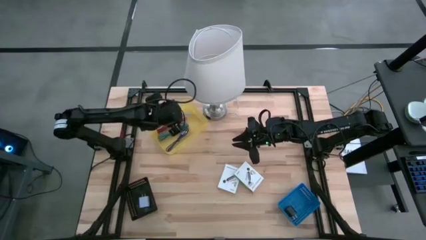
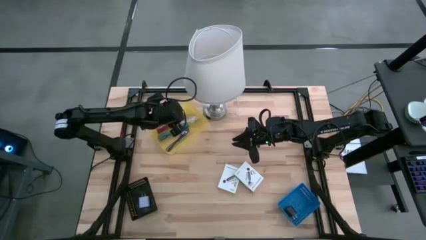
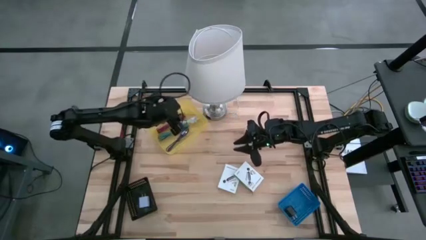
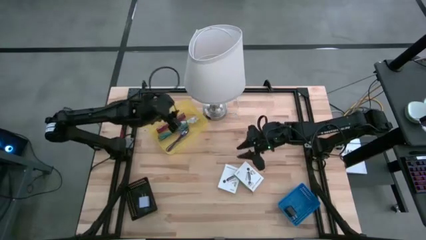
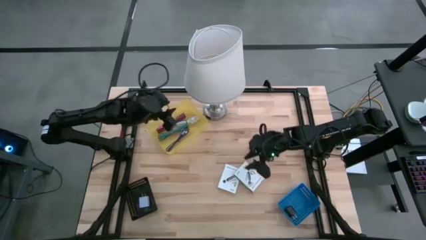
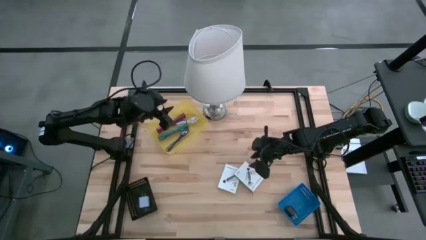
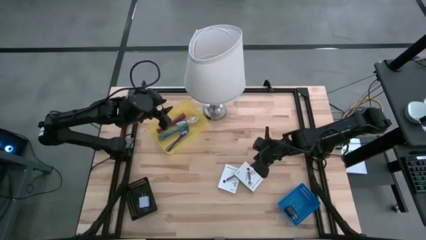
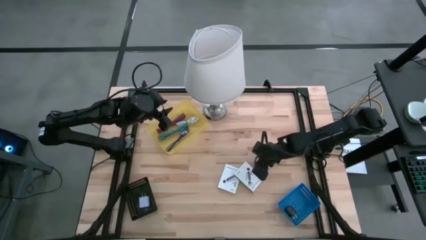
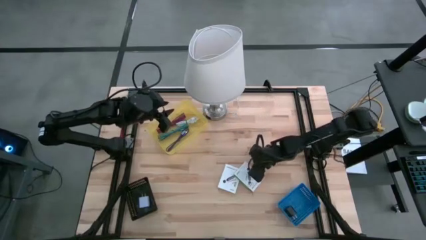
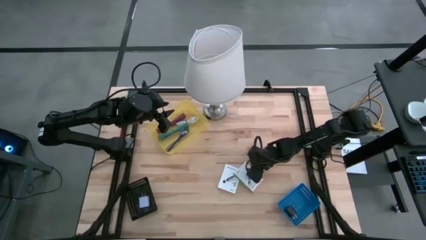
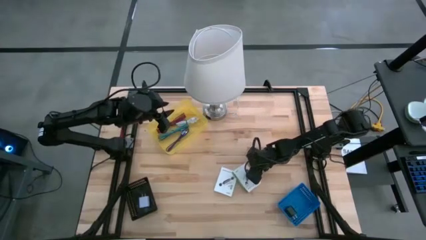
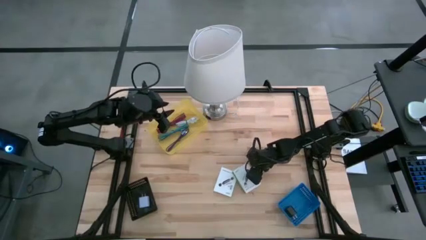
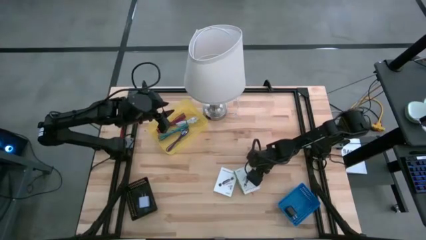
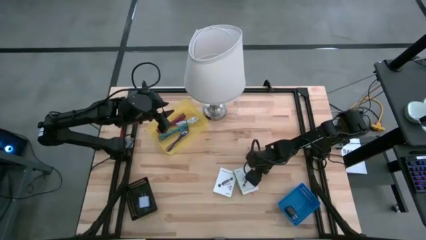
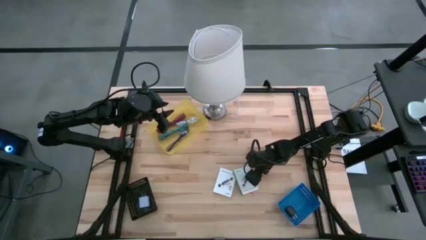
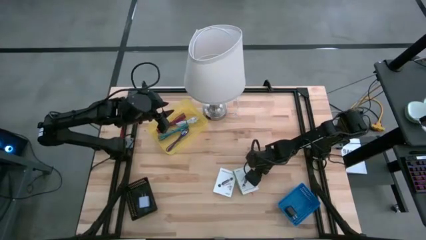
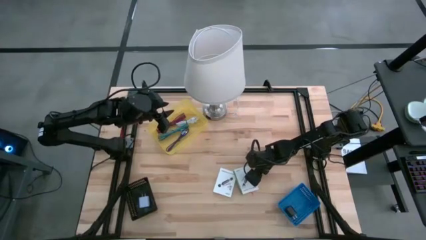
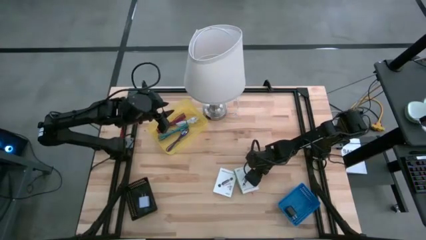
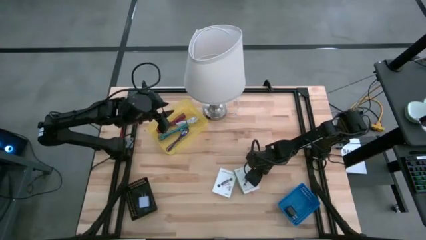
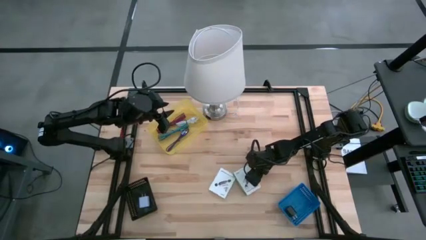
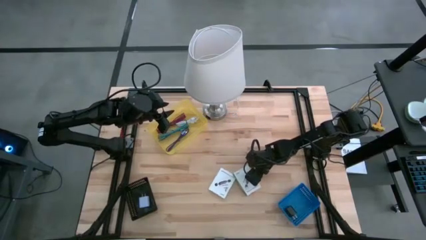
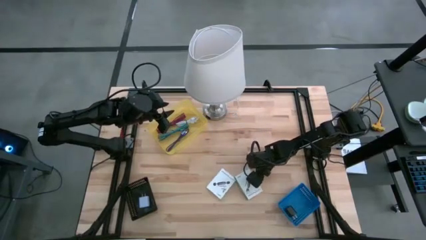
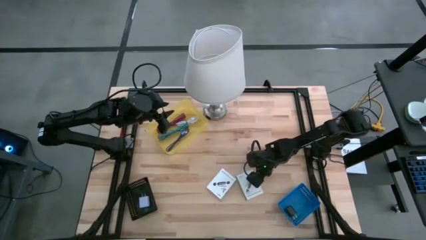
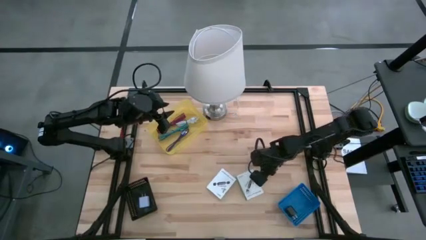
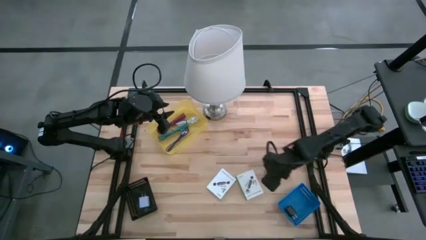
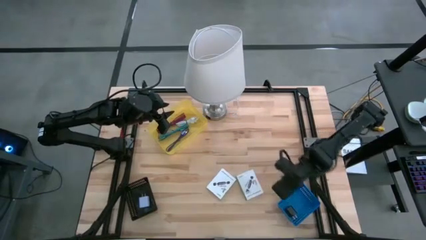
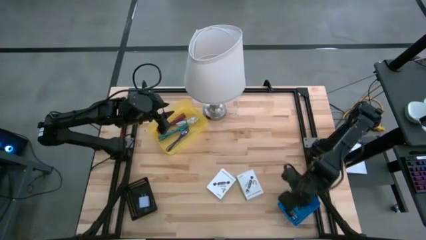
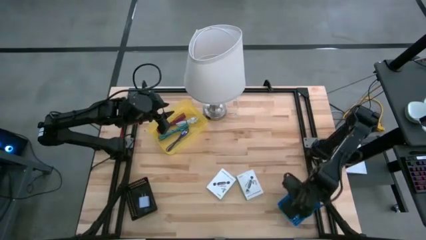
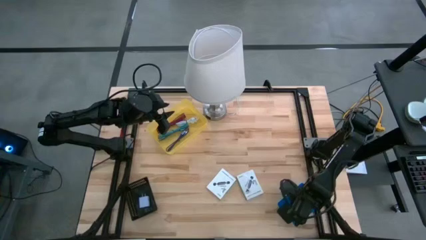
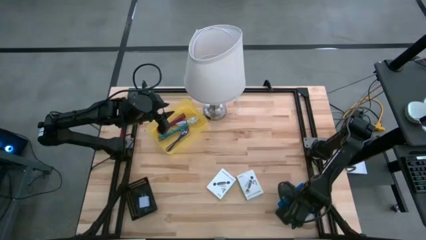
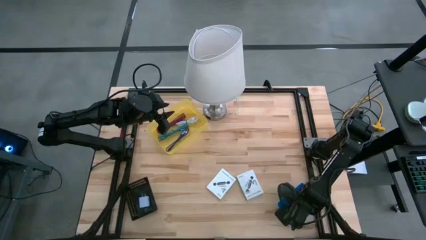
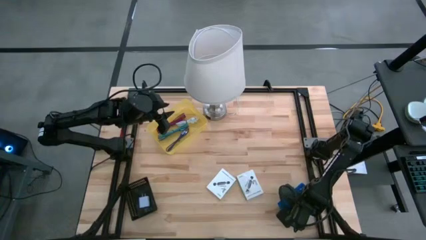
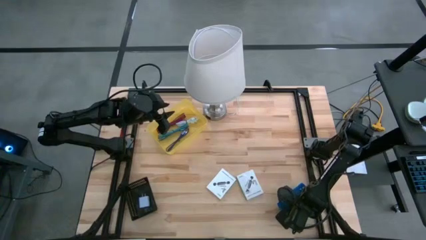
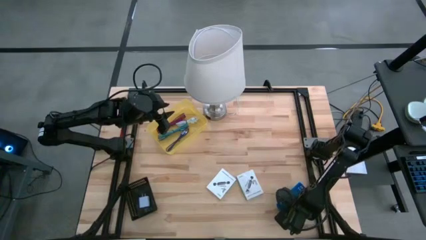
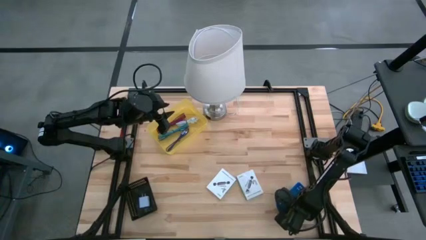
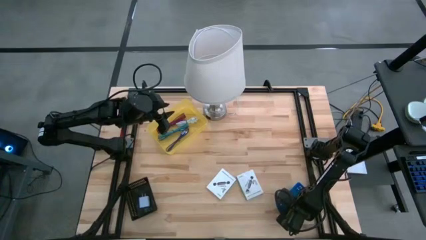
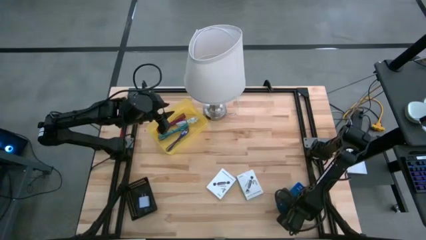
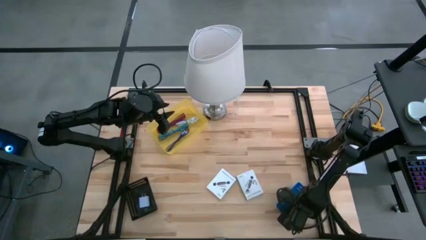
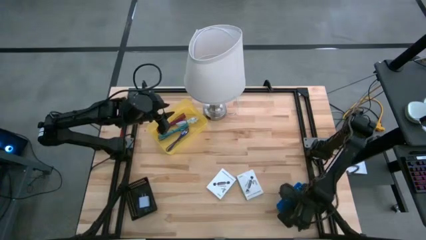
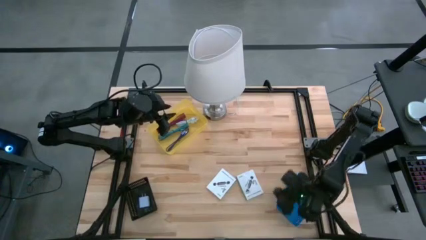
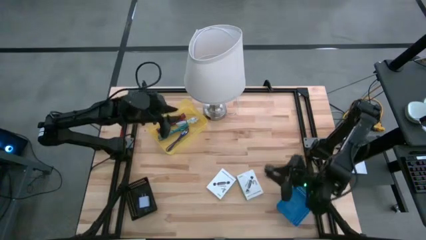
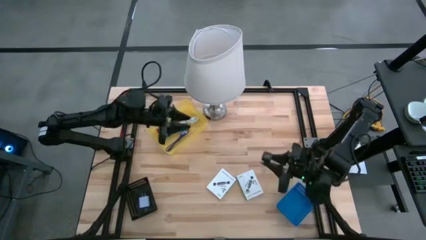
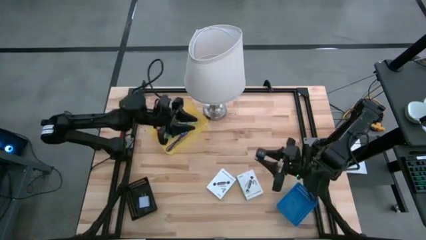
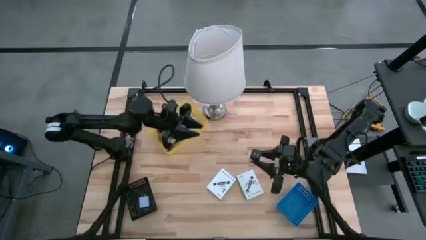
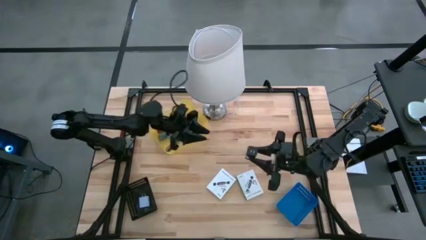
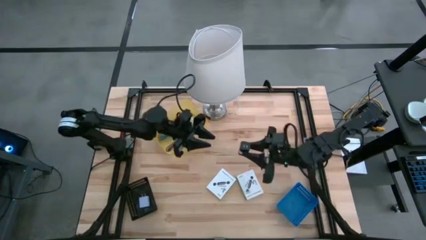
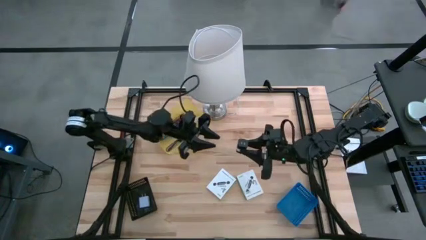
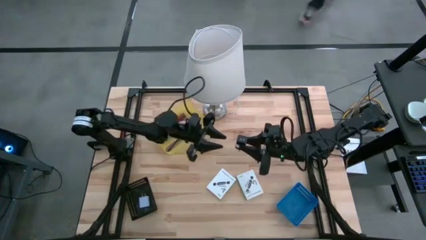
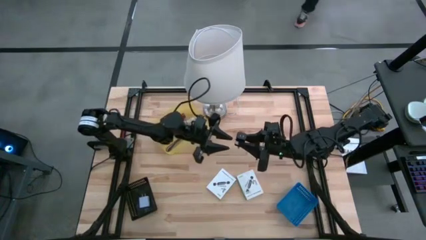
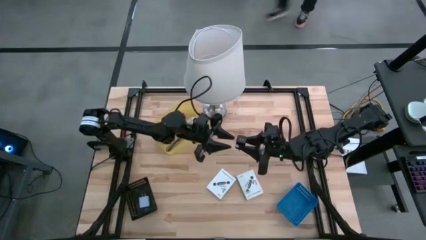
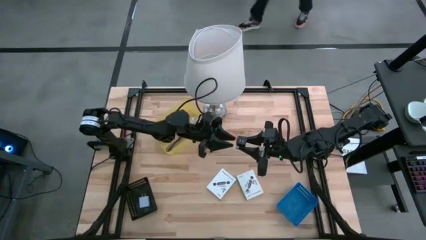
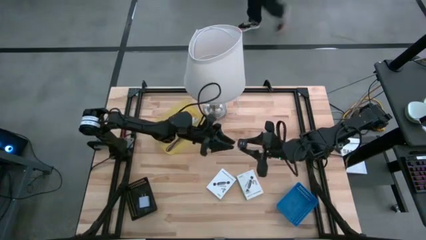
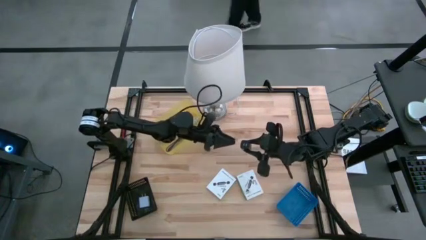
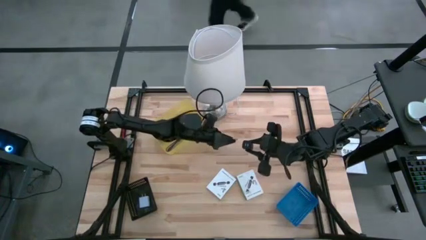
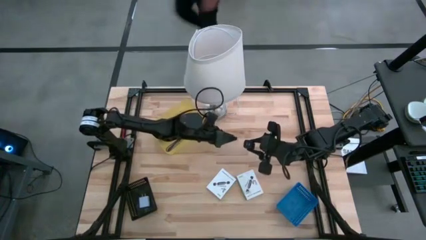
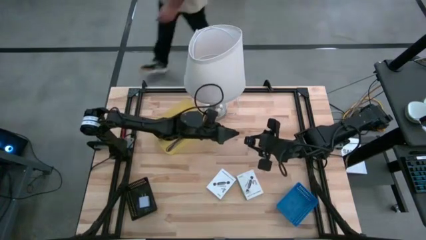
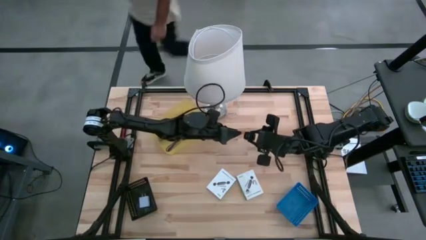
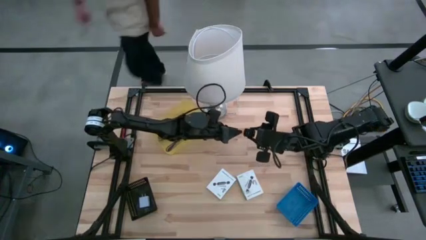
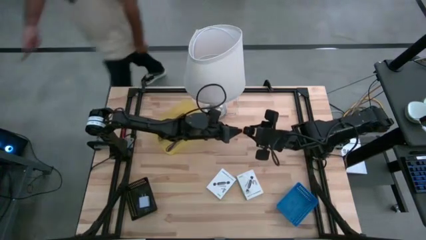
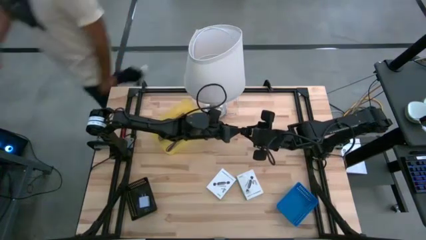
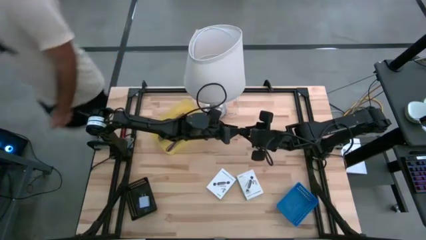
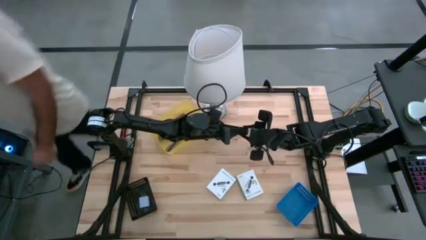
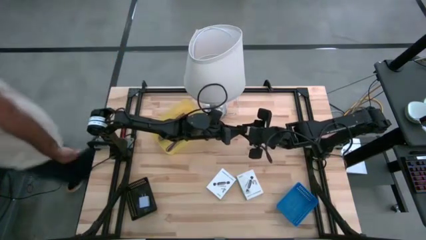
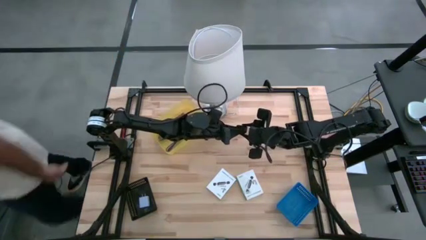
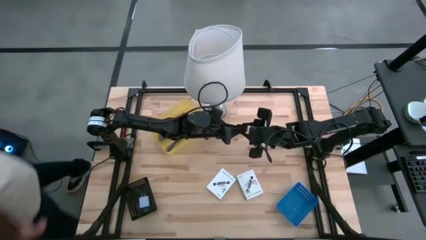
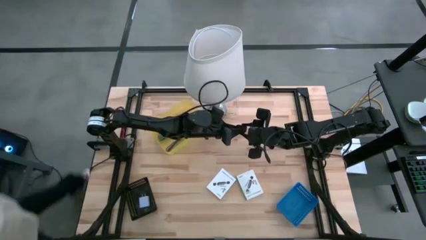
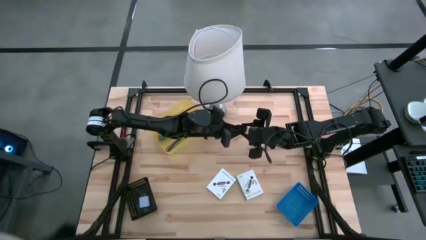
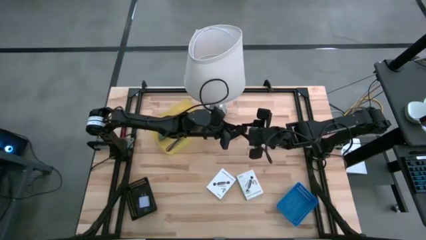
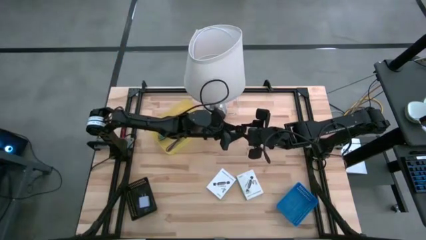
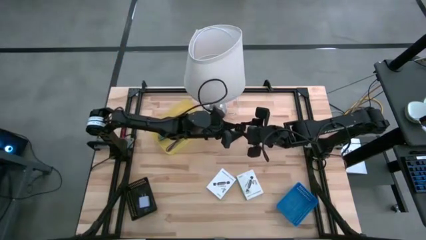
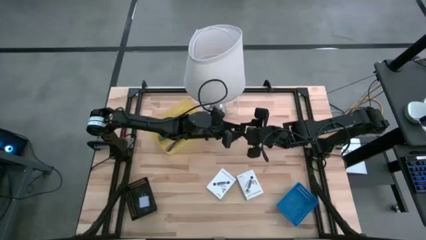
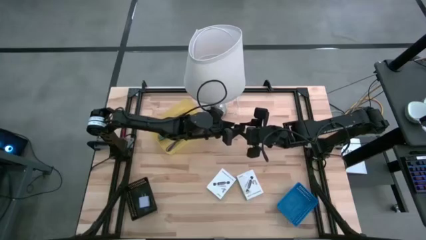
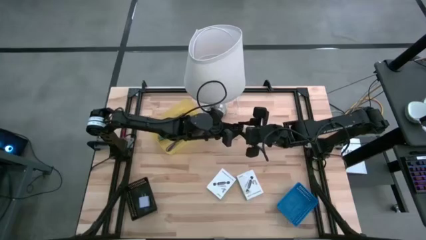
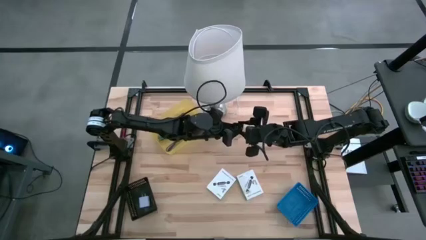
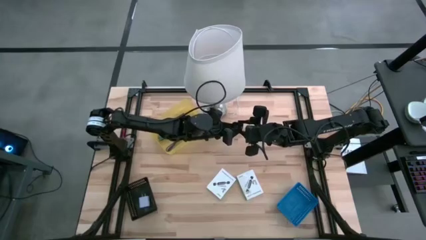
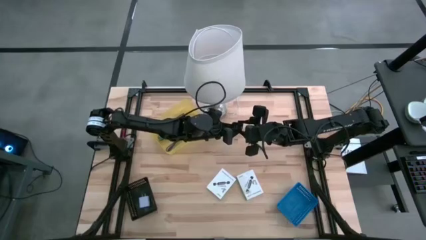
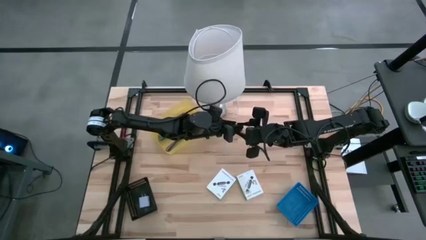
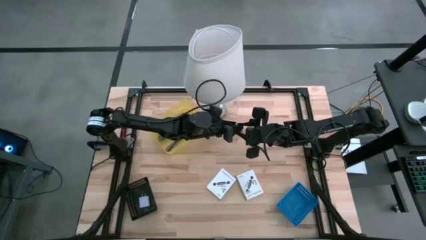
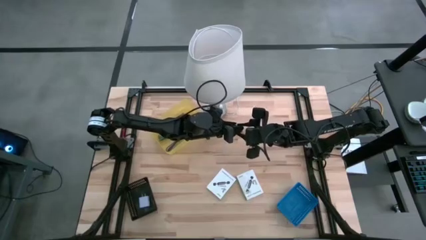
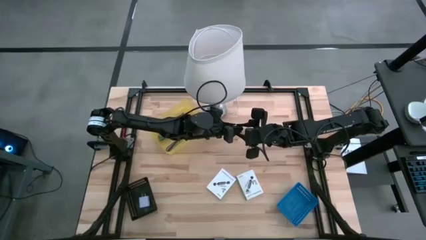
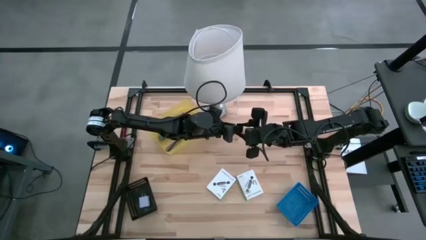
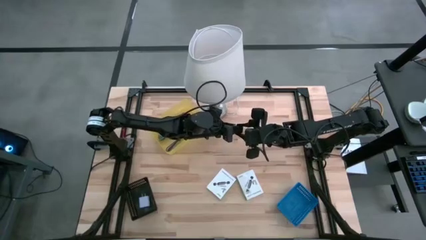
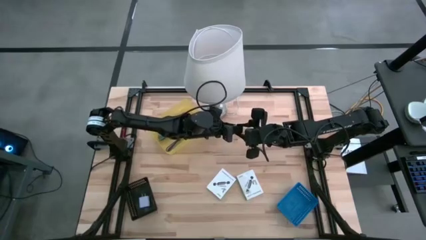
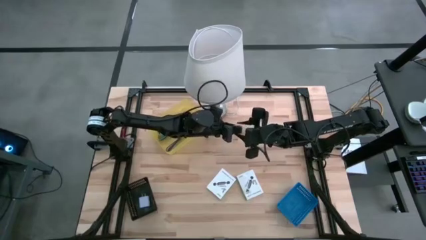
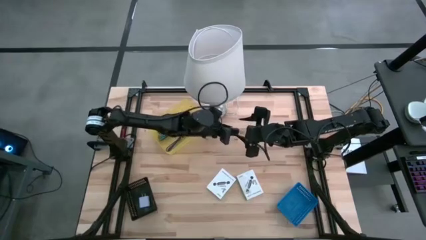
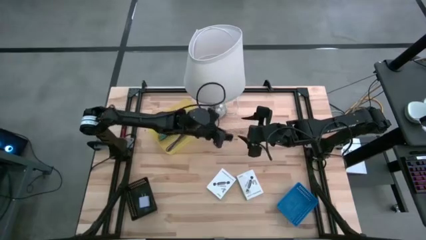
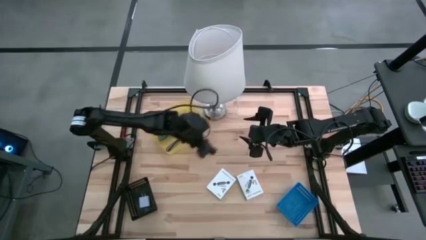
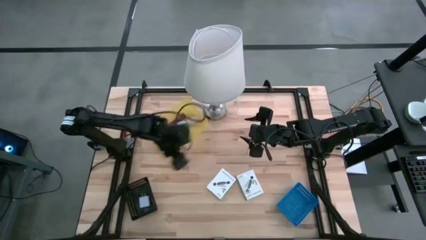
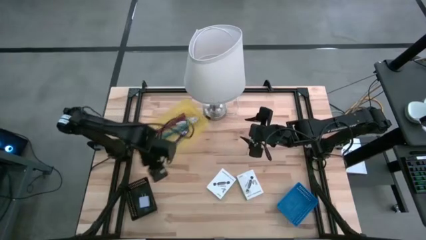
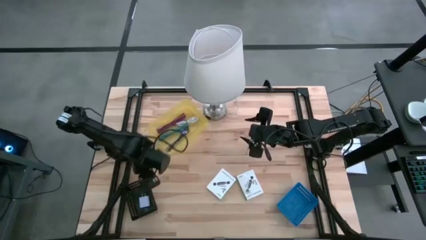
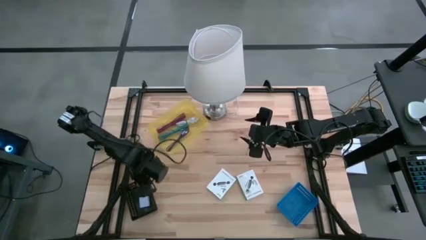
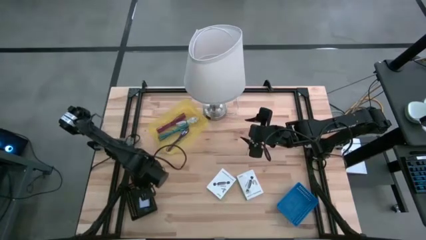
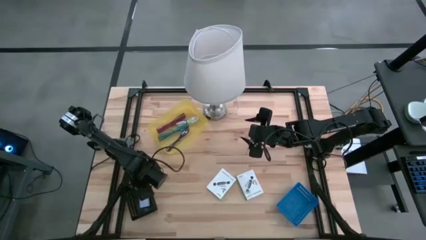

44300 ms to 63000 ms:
Task: Pick and place items into bin
Put the black charger adapter into the black bin
